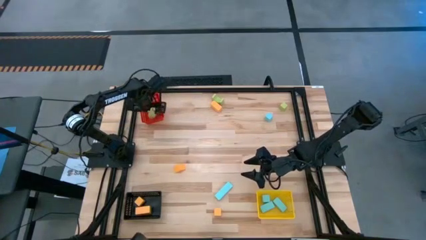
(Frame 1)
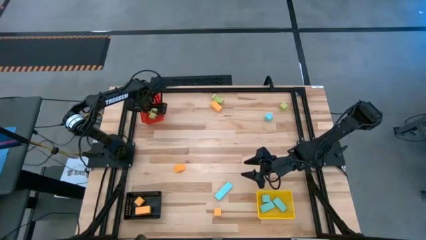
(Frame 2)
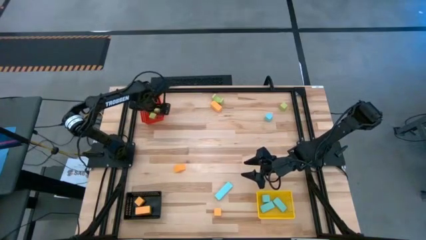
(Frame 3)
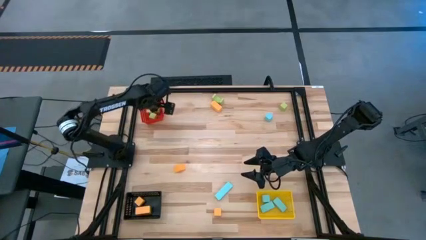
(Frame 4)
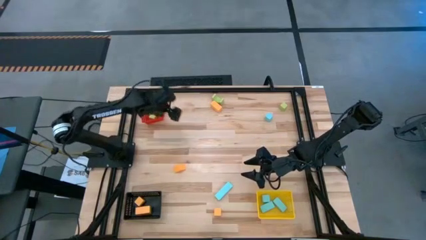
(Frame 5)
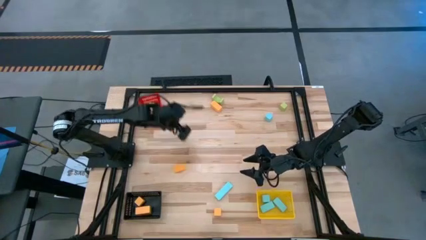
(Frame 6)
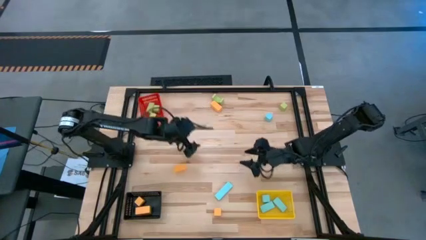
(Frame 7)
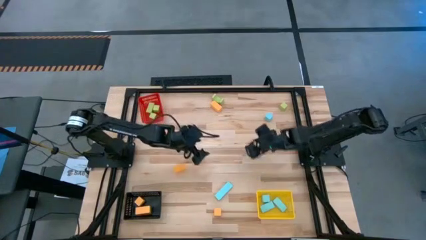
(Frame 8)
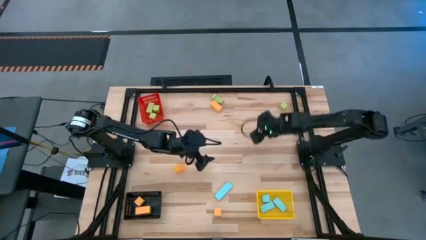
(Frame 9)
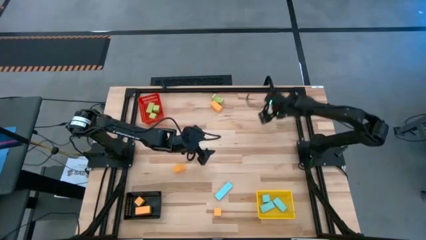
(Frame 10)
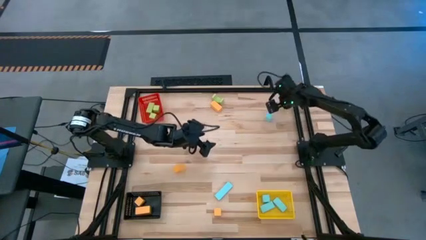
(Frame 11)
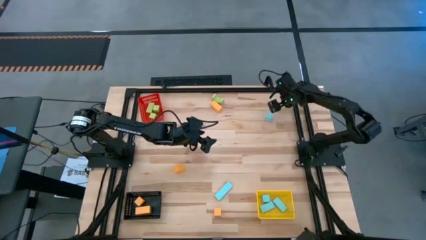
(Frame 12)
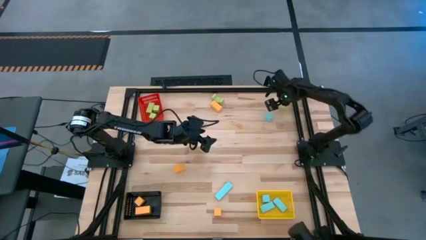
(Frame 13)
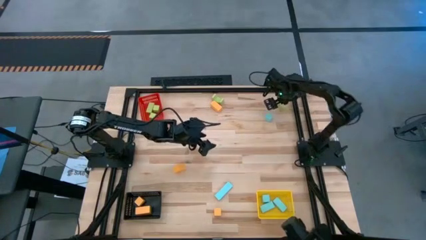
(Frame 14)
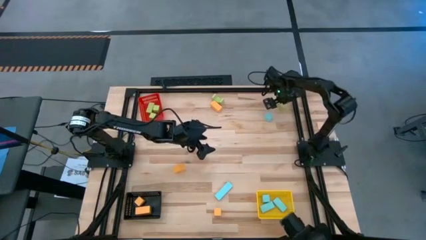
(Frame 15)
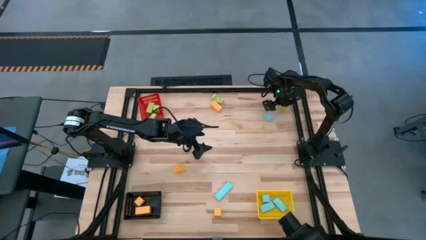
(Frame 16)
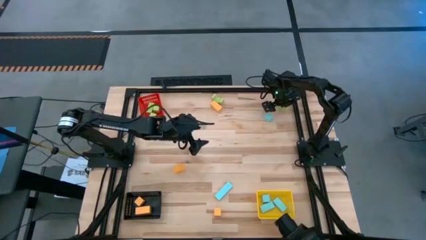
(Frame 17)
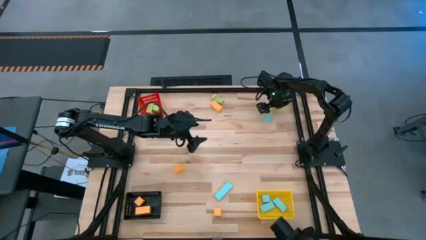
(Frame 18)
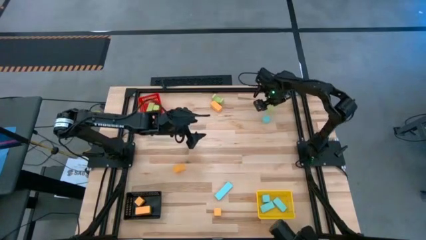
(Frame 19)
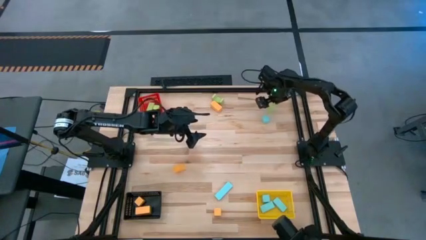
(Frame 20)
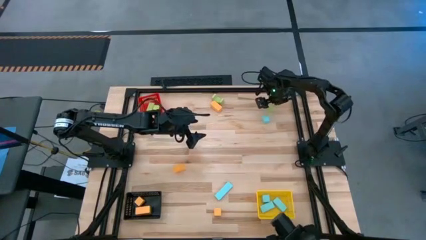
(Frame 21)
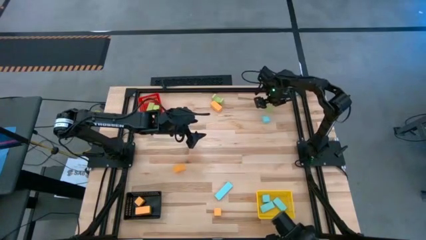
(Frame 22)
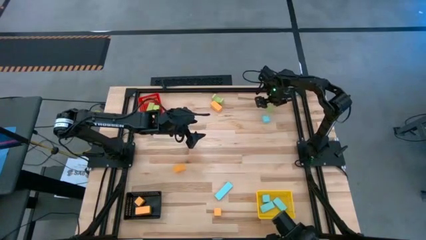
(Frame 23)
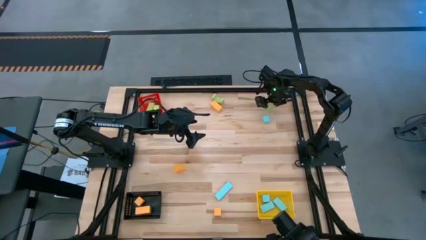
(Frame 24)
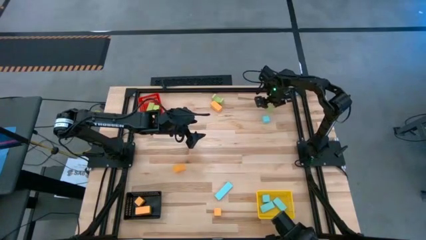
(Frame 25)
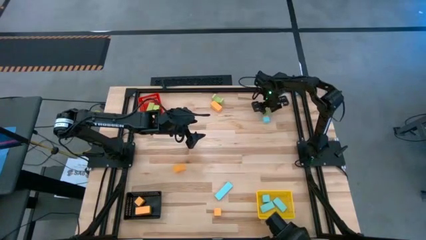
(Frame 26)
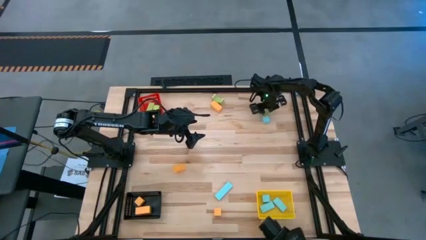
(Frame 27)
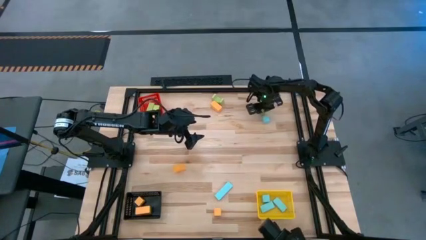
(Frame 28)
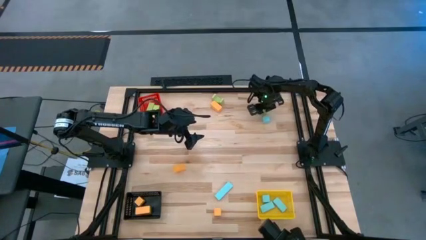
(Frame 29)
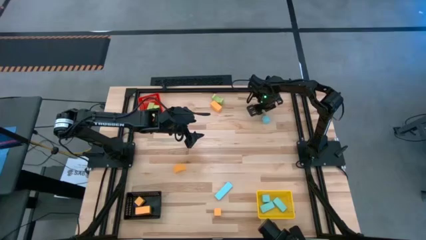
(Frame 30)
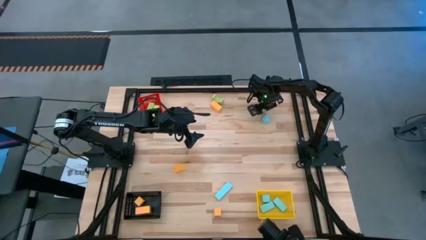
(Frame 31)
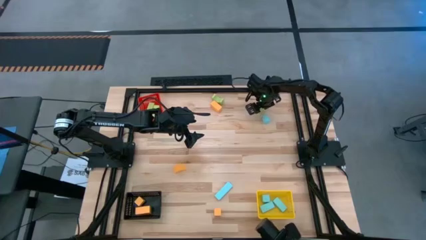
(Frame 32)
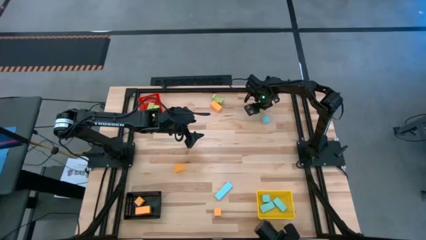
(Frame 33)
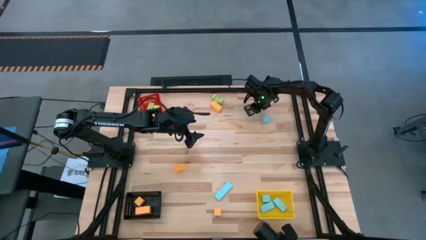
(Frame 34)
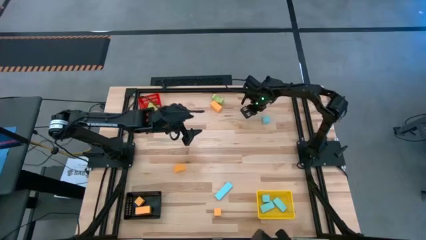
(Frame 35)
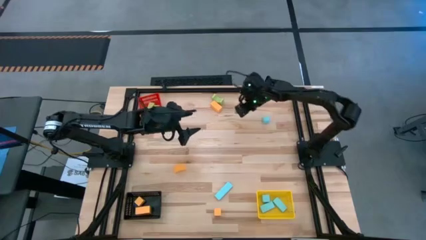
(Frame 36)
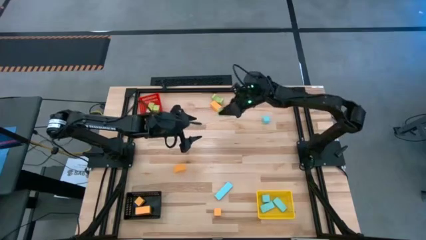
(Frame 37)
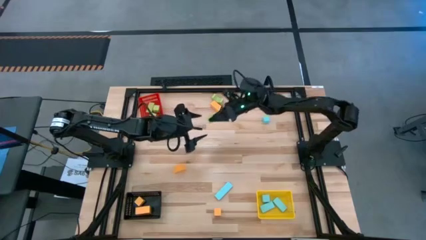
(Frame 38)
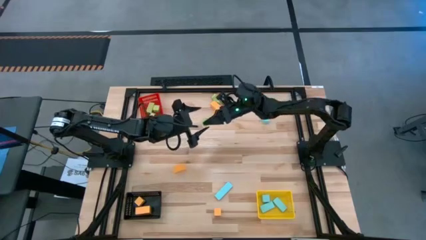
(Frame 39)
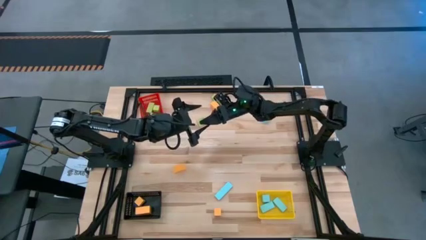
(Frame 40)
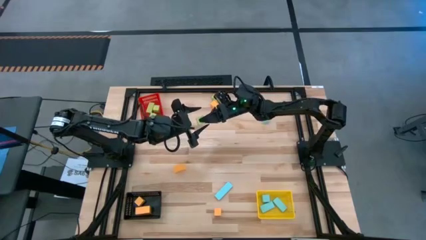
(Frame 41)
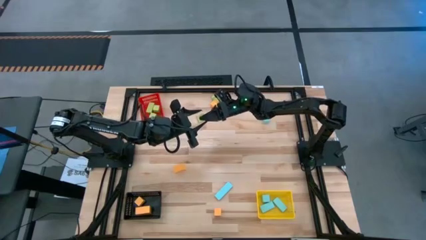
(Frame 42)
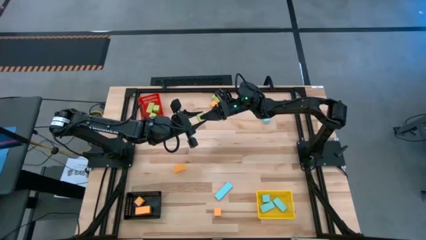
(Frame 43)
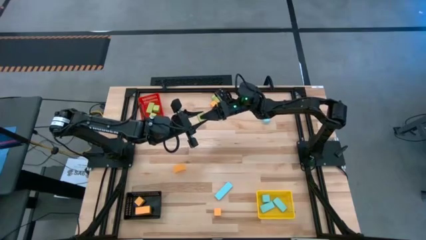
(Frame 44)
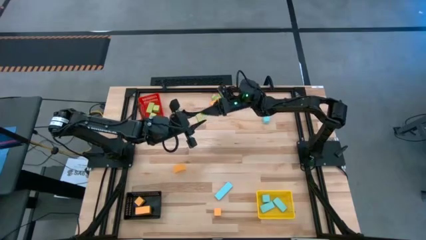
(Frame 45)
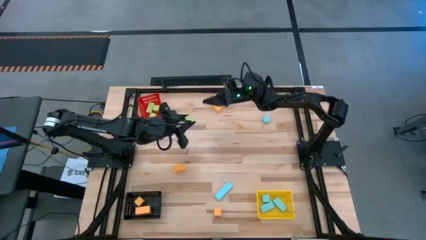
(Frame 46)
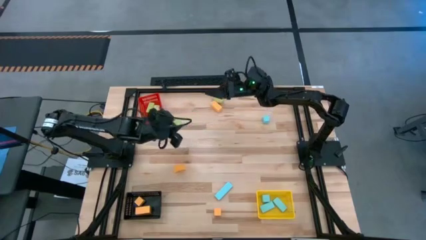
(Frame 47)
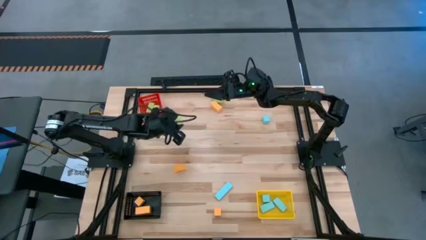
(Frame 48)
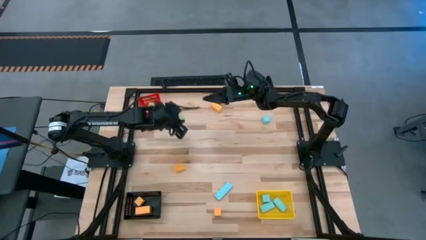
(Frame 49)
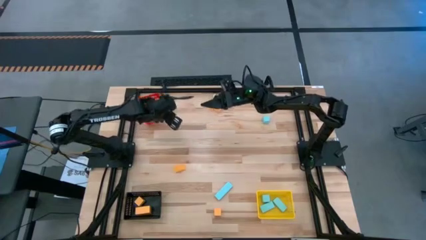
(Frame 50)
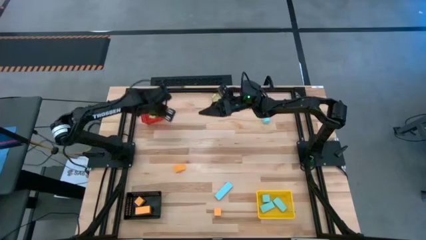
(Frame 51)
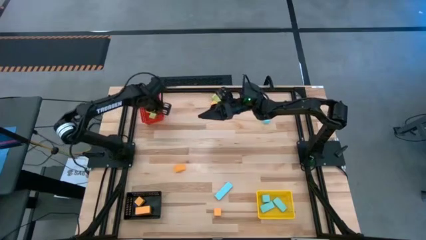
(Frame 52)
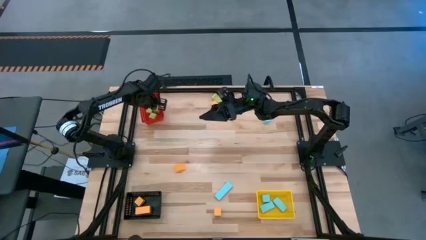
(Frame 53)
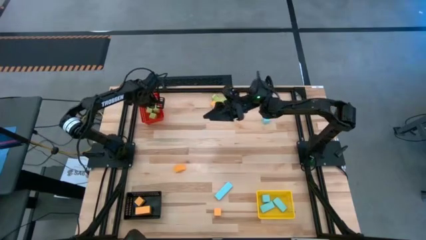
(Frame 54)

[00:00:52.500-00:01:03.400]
Task: Sort & place blocks by color
Put the green block into the red bin

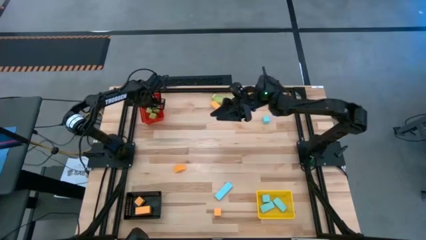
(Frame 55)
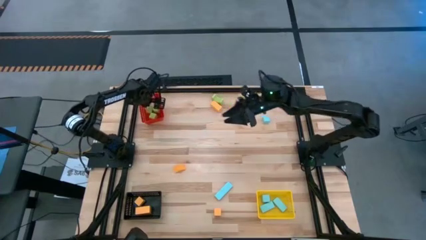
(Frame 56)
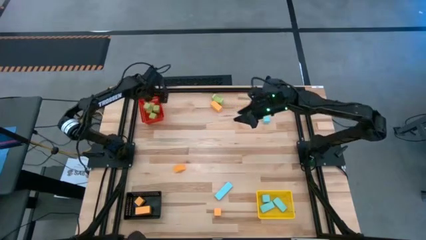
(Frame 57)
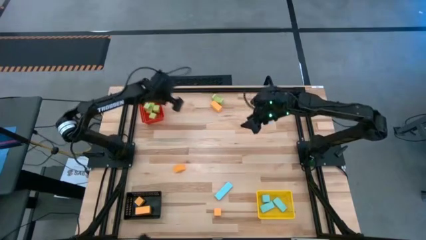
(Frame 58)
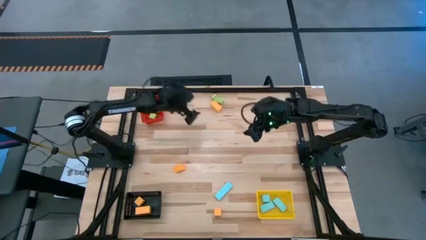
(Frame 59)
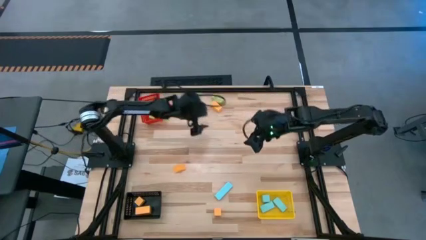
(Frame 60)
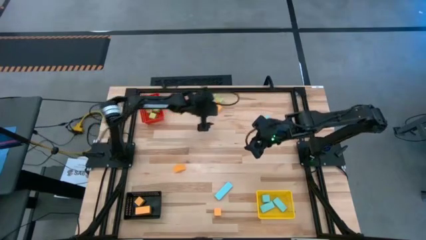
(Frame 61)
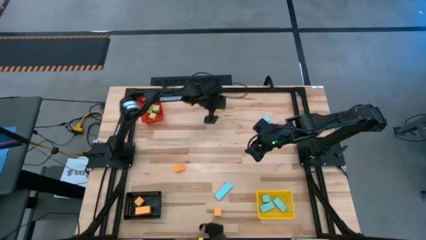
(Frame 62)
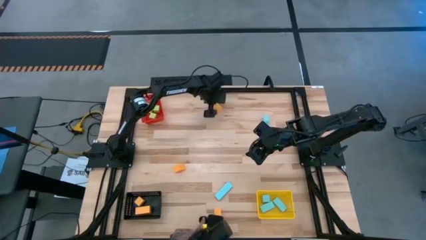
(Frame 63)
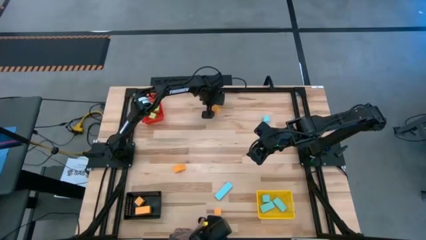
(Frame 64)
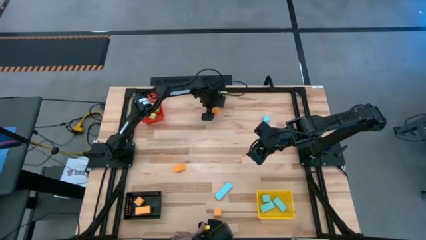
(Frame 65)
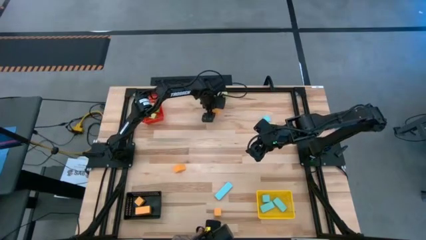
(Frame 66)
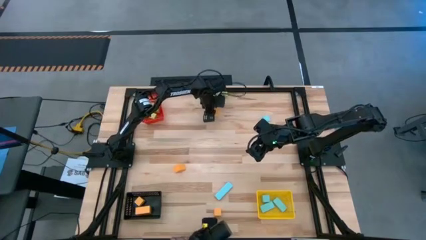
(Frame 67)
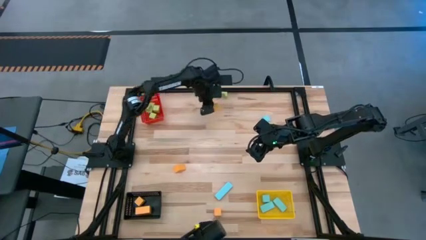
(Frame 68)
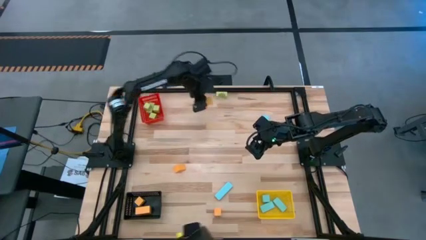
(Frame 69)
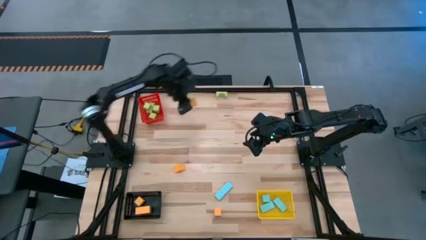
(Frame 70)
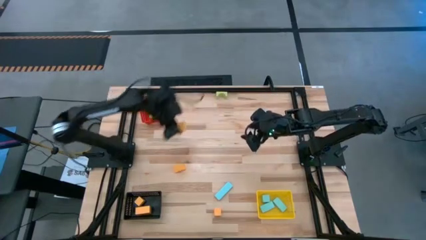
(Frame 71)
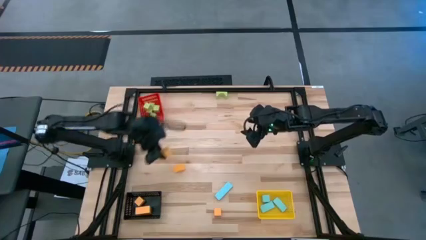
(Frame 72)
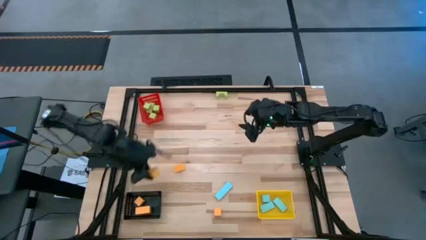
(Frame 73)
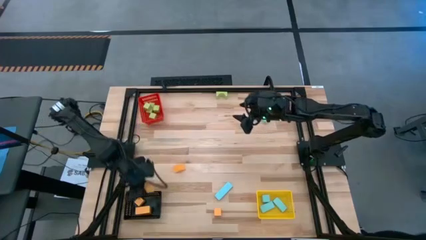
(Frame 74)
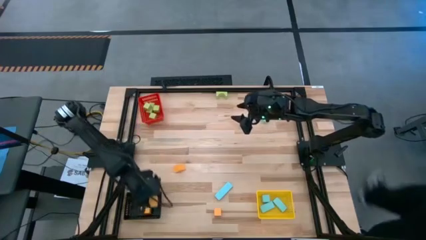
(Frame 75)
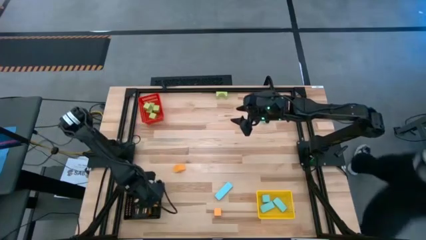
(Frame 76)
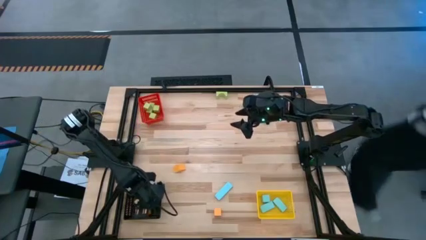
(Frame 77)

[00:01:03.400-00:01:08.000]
Put the yellow block into the black bin

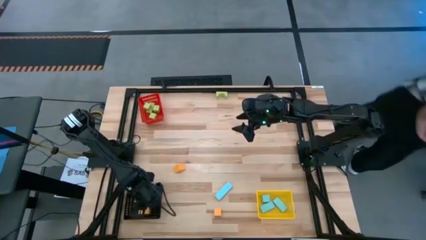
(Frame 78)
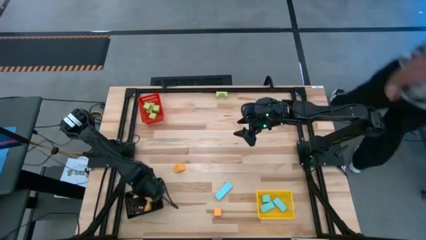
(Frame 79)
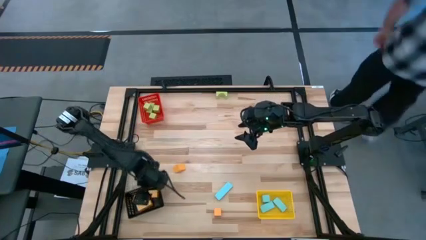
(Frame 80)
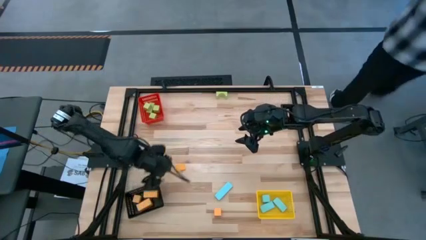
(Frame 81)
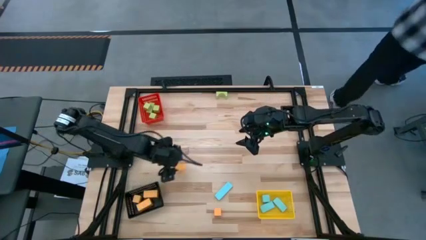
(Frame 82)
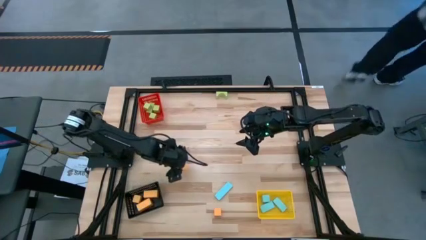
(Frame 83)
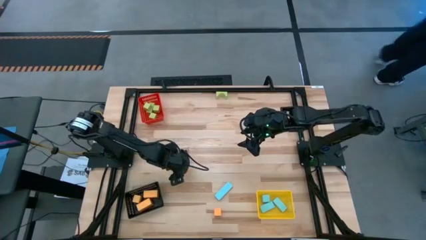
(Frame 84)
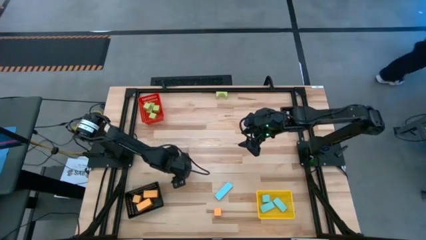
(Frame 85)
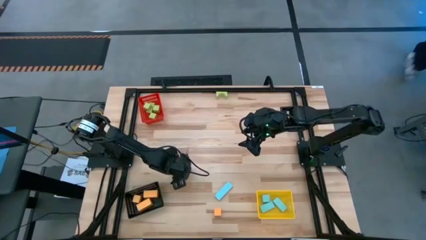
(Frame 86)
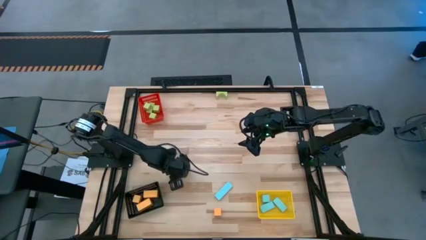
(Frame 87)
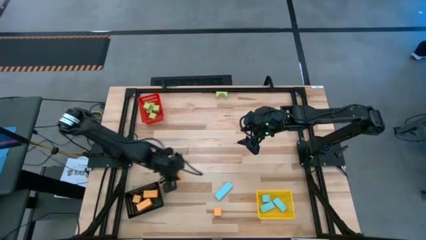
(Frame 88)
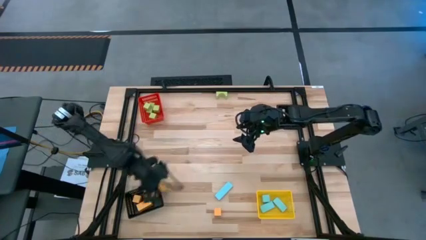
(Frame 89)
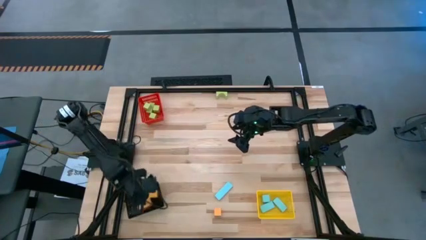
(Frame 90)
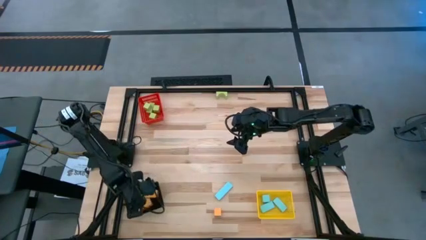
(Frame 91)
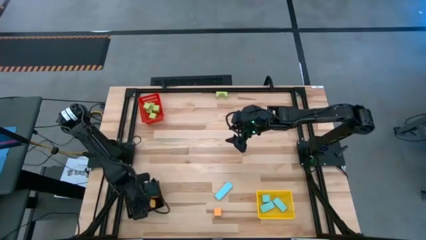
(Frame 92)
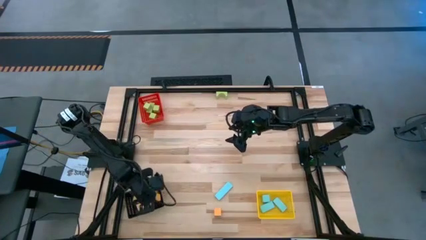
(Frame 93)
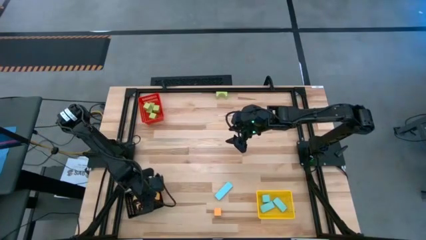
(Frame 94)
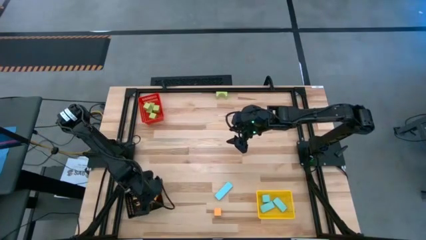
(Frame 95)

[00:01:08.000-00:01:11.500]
Put the yellow block into the black bin
